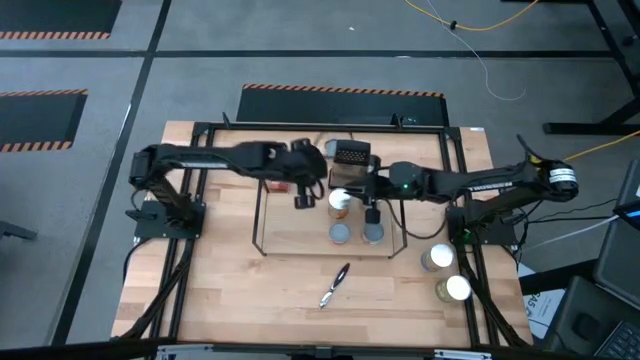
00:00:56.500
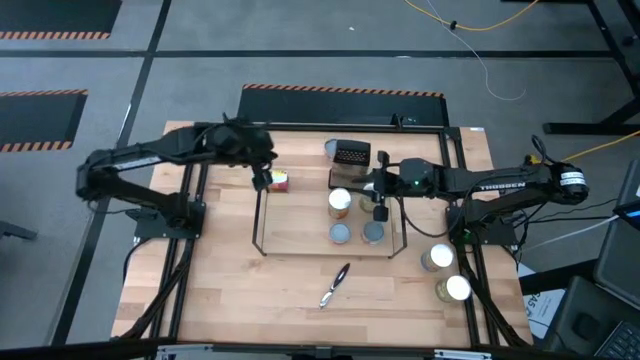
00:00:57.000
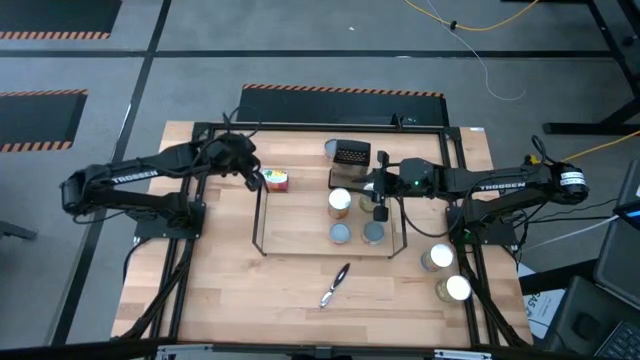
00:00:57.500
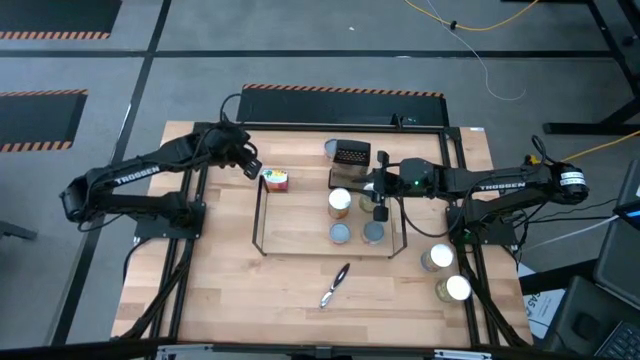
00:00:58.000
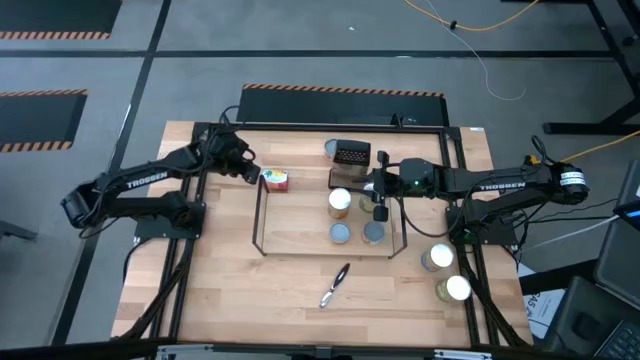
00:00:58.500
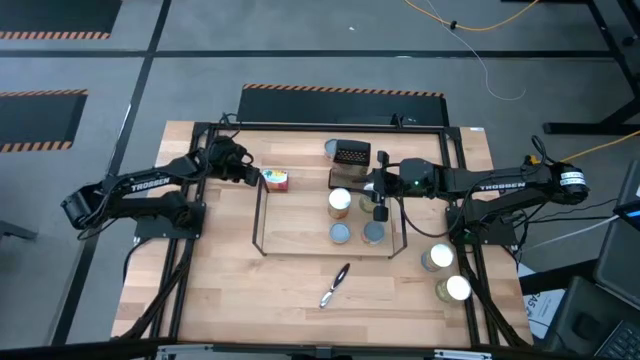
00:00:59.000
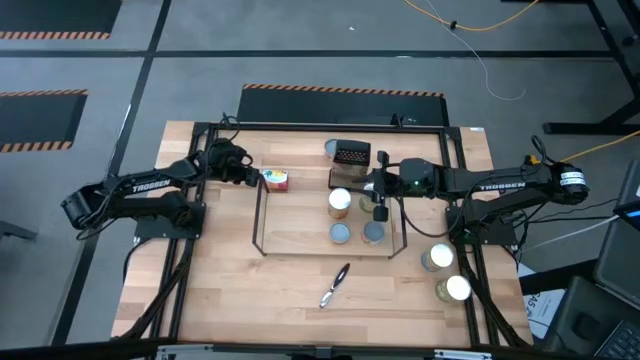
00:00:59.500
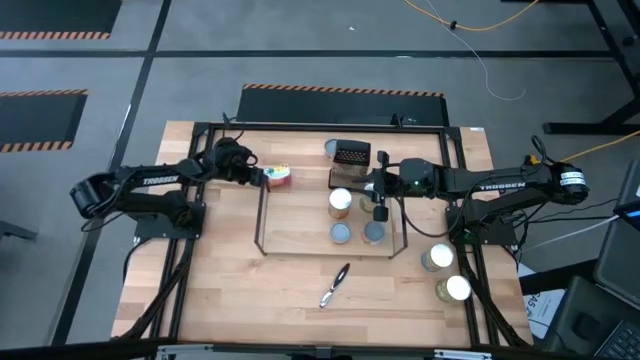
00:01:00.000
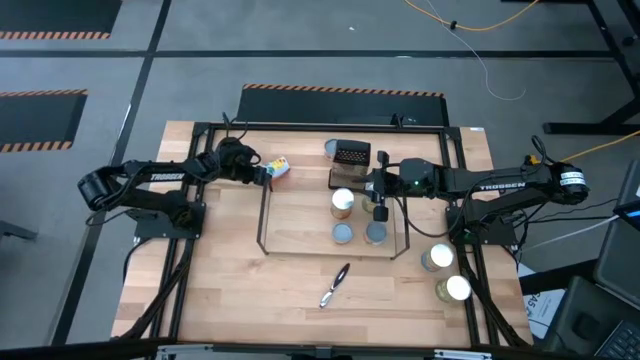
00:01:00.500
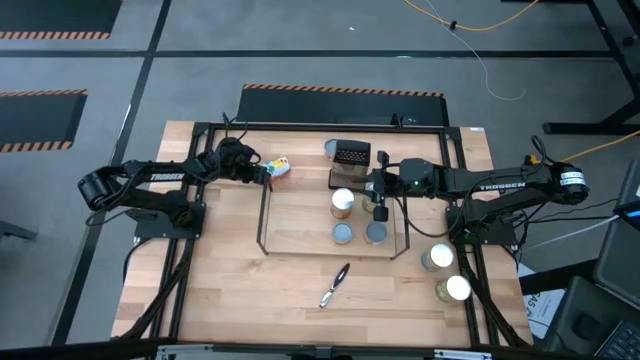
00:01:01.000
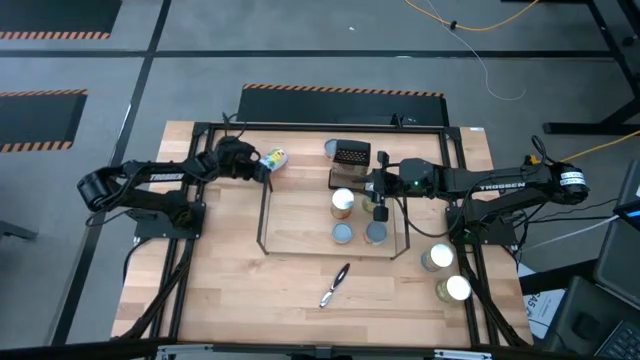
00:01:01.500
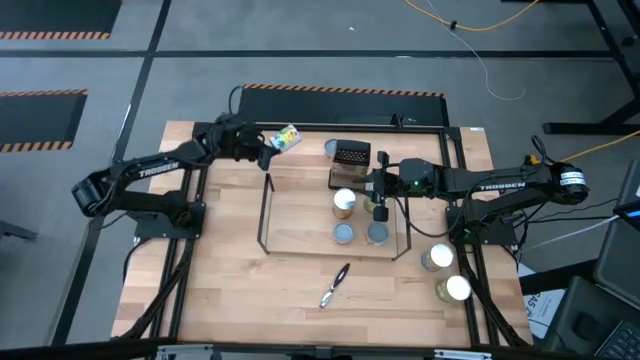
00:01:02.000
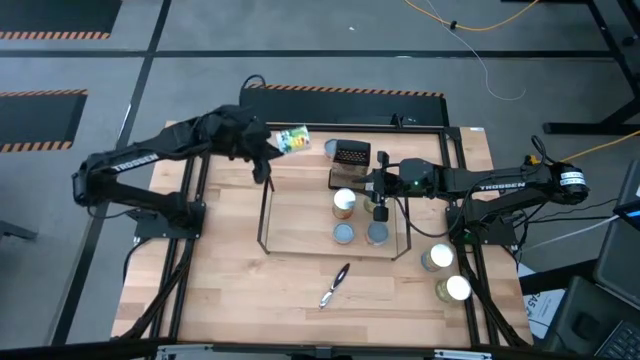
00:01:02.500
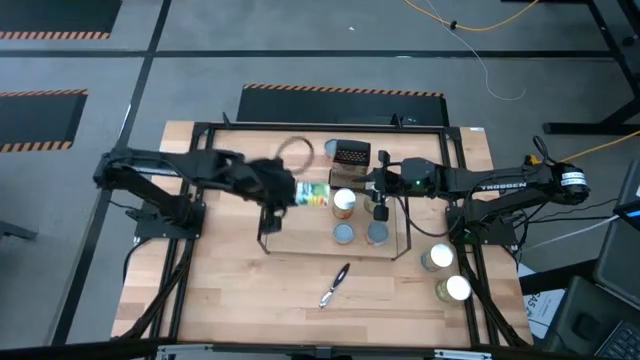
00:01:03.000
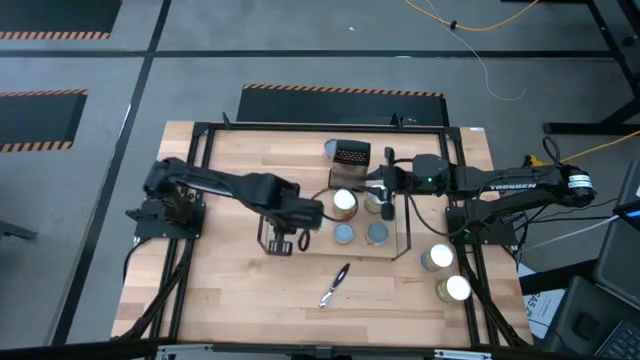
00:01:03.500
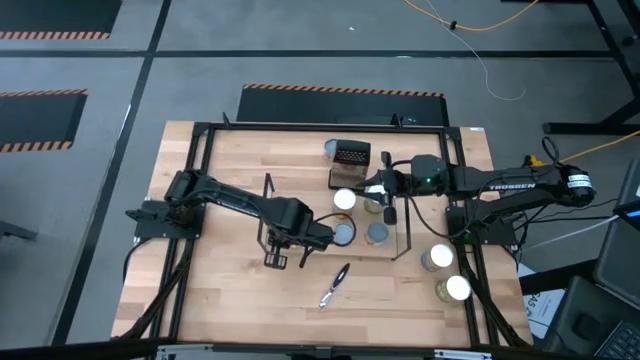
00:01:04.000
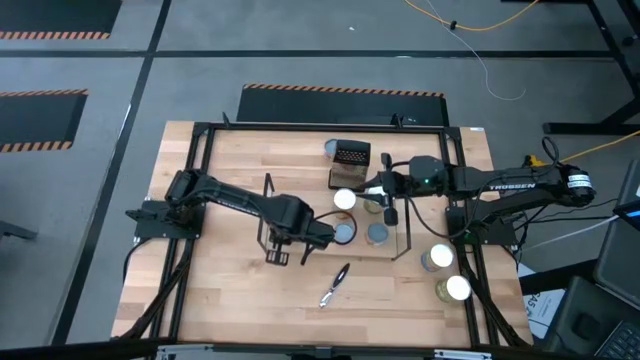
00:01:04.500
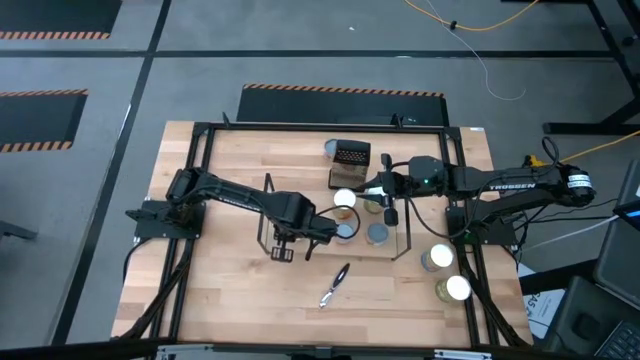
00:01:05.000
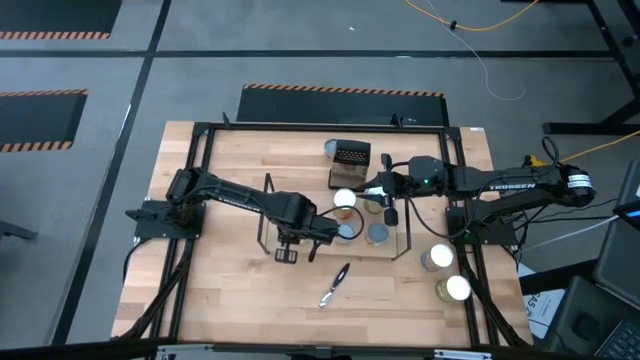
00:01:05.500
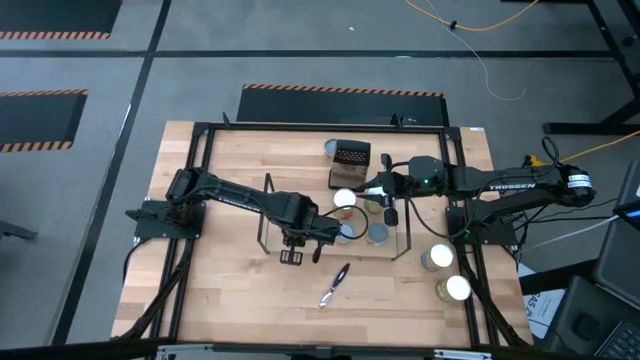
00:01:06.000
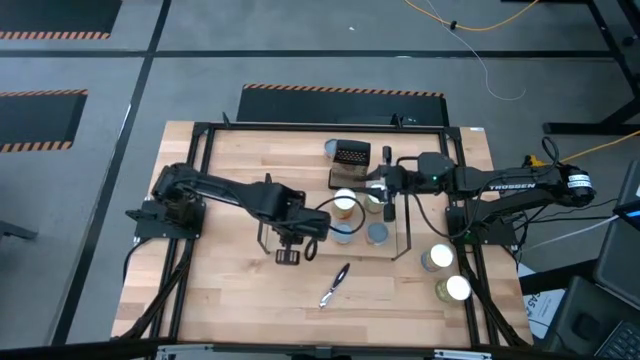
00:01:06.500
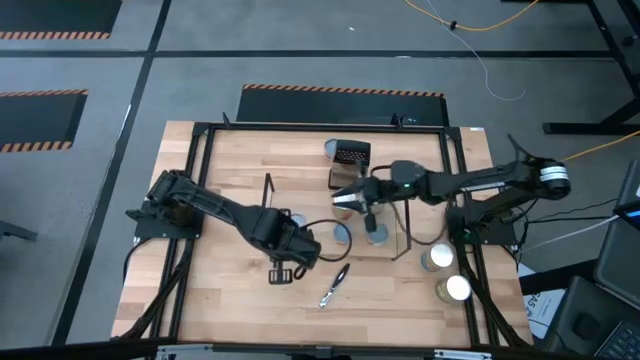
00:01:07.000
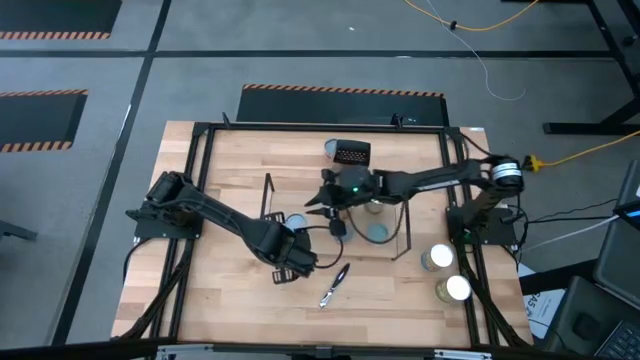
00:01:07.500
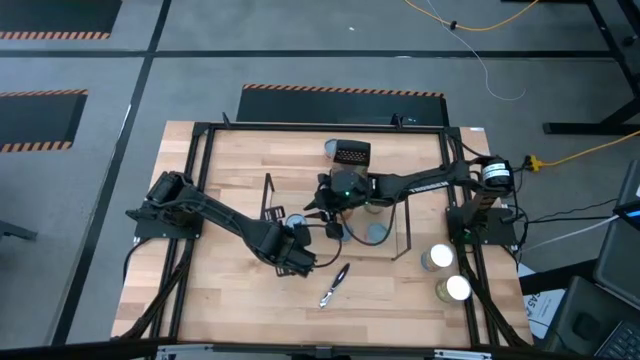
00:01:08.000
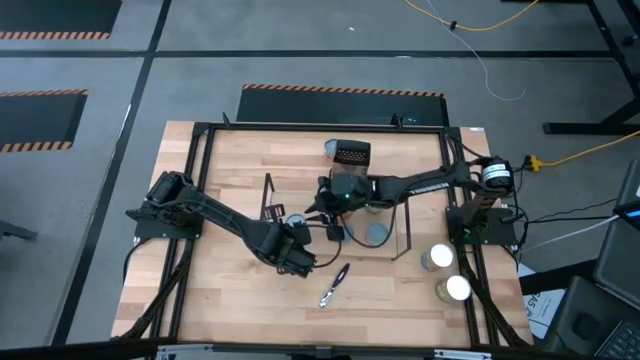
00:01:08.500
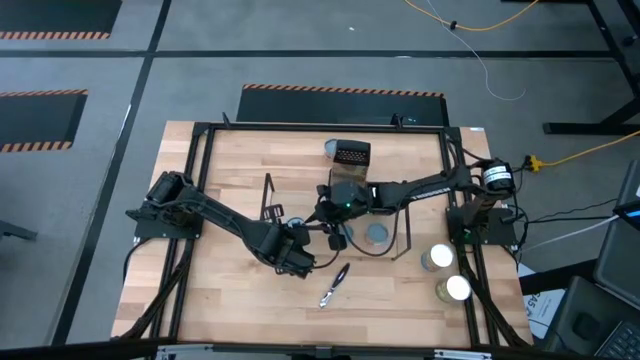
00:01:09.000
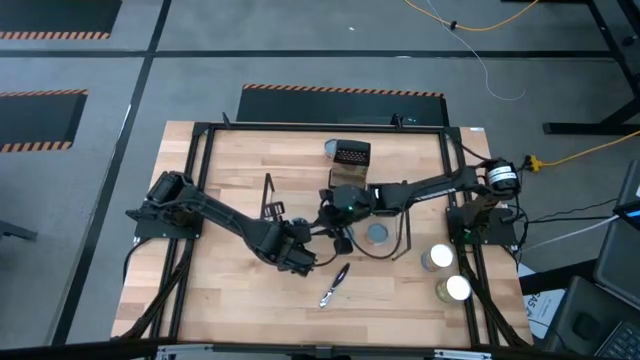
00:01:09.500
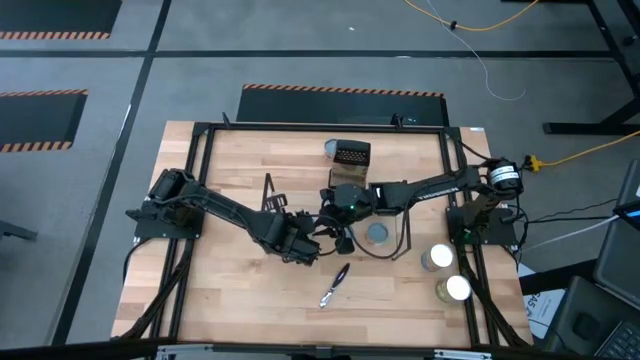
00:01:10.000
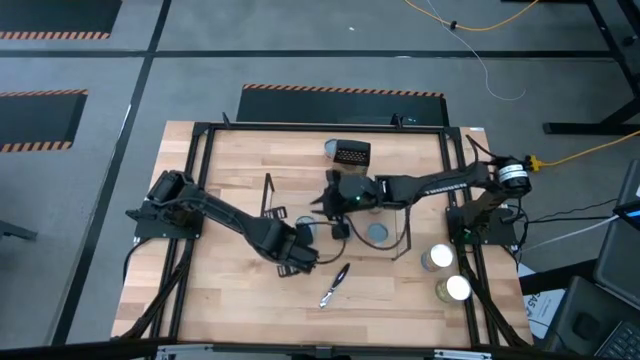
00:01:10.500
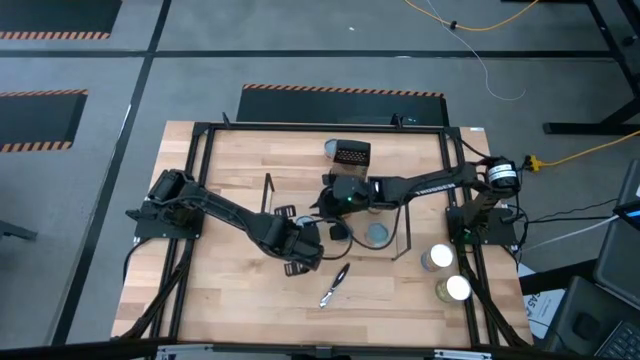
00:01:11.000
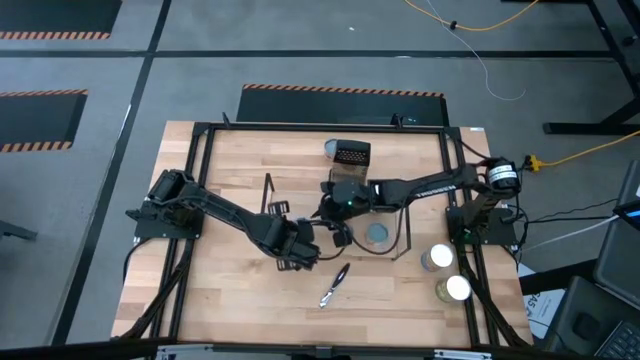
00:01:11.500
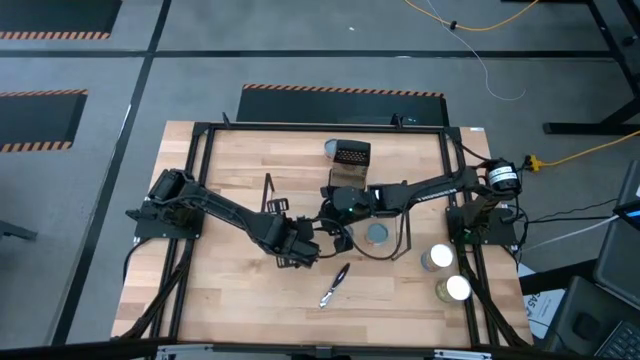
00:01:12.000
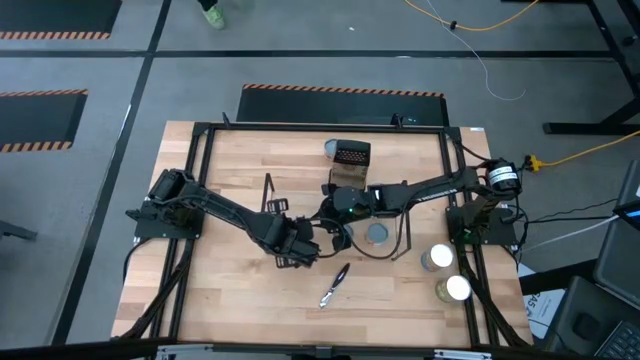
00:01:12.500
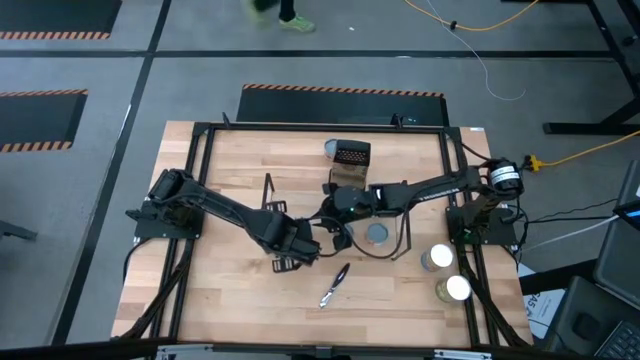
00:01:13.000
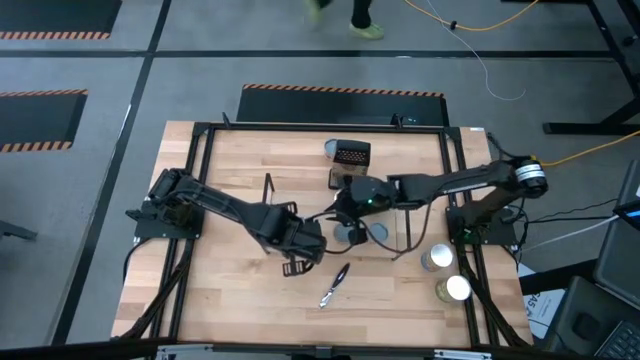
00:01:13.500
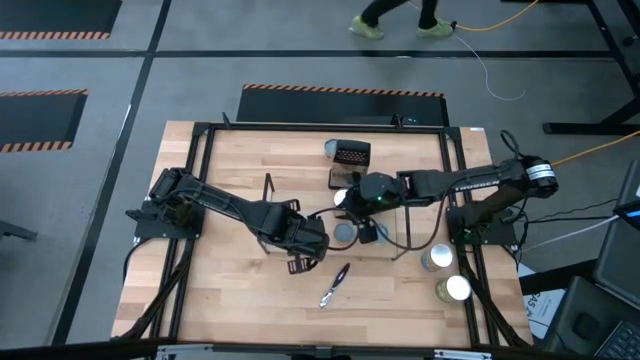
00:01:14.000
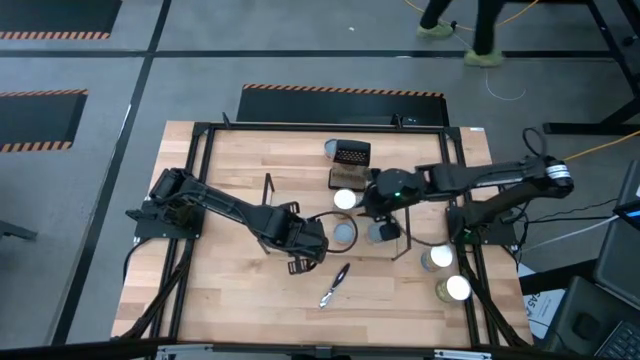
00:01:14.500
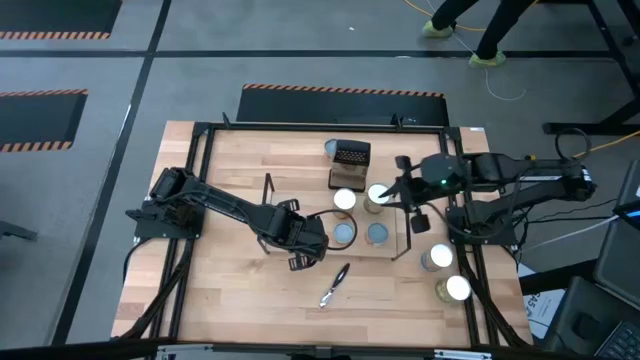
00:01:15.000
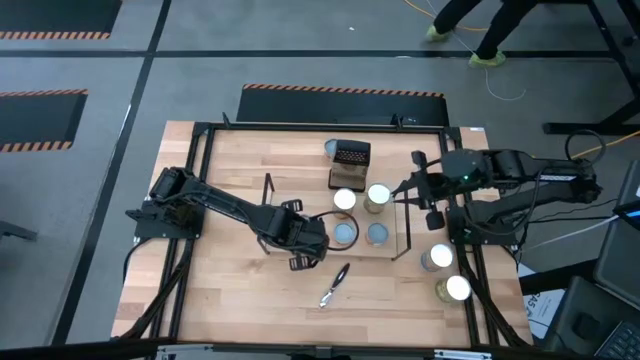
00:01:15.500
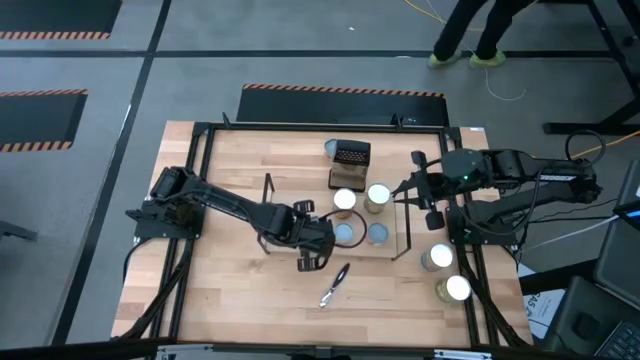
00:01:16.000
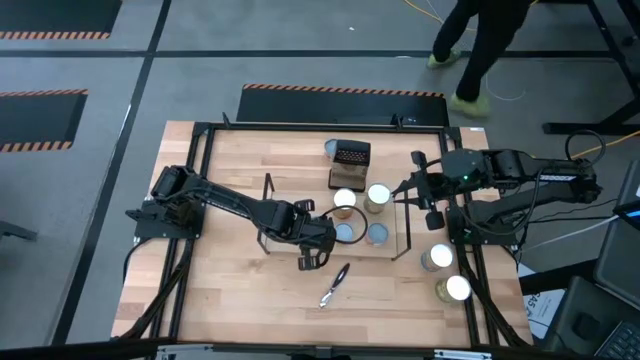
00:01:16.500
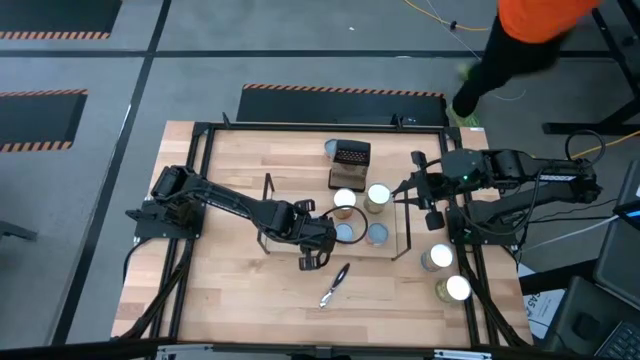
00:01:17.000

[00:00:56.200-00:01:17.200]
Task: Pick and place cans onto a shelf
Put the canned mixed fruit on the shelf

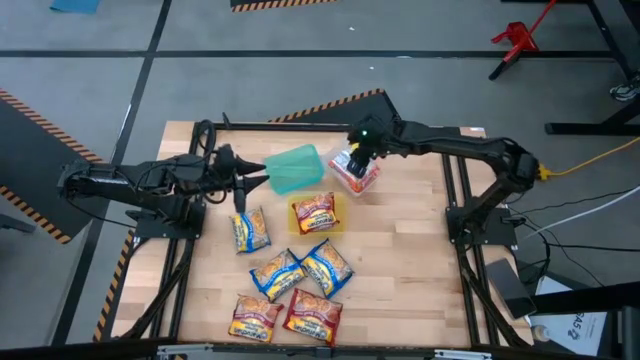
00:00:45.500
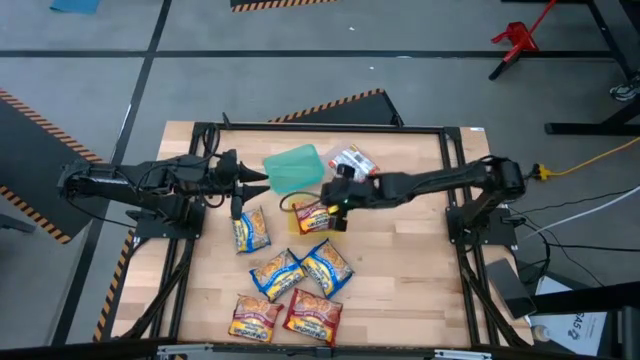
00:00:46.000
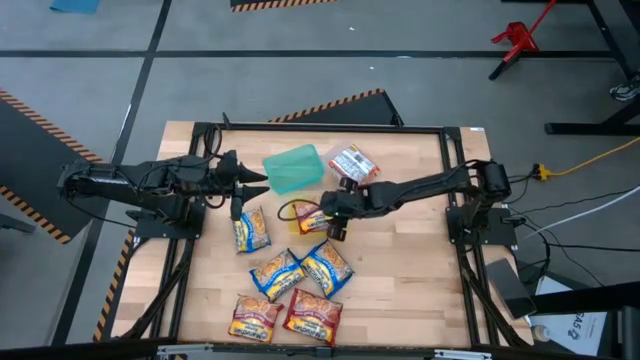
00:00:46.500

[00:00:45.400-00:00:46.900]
Task: Sort Maruchan noodles
Adjust the red noodle pack in the yellow bin
